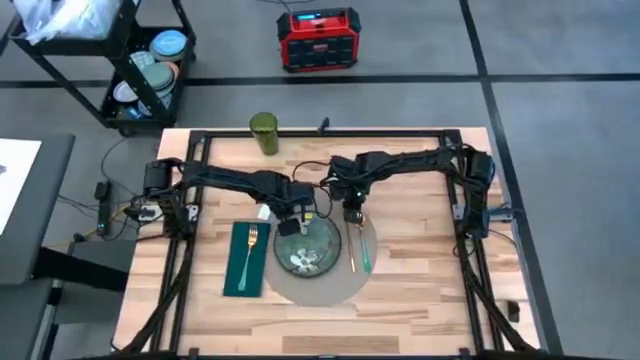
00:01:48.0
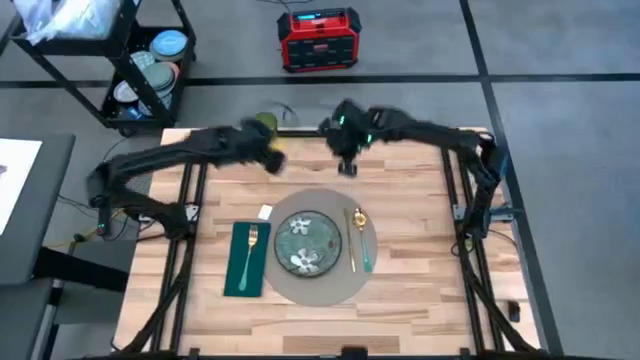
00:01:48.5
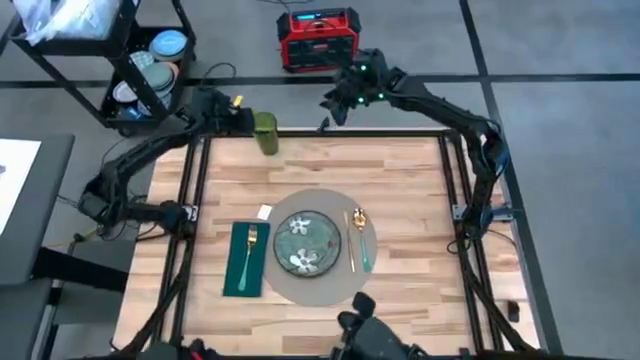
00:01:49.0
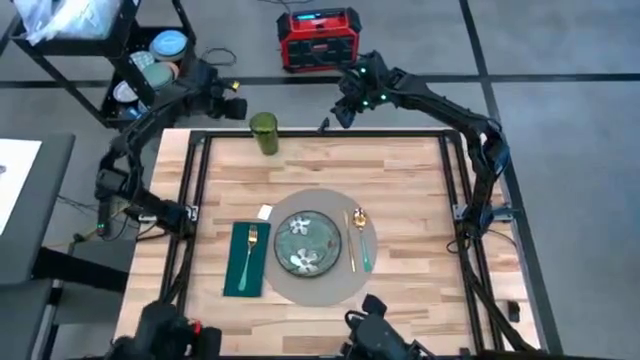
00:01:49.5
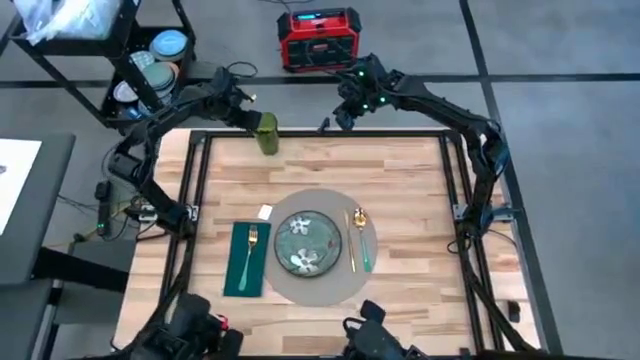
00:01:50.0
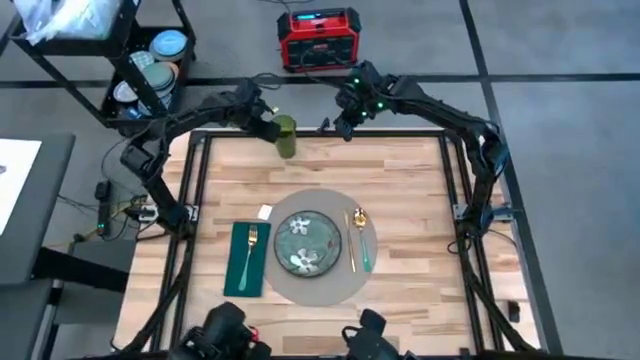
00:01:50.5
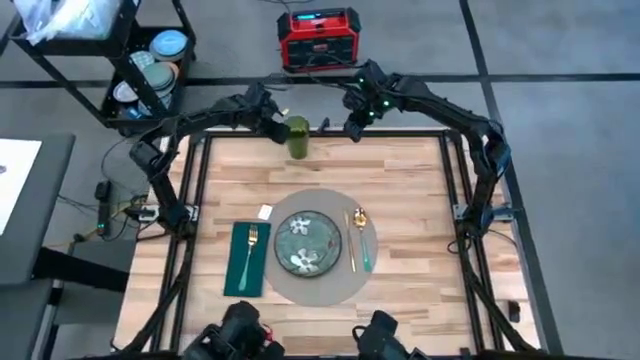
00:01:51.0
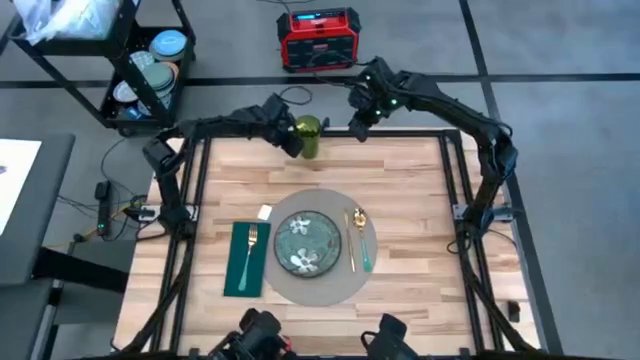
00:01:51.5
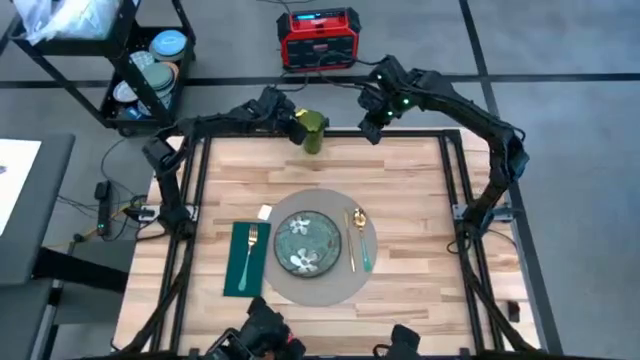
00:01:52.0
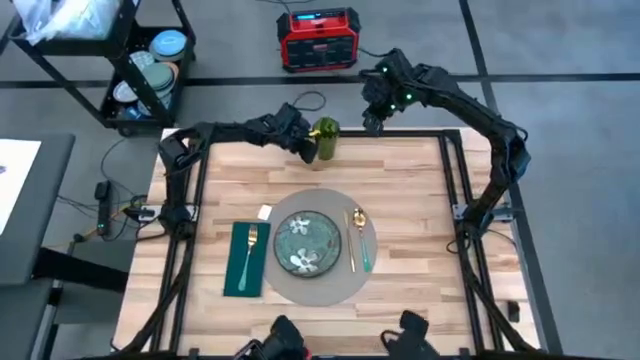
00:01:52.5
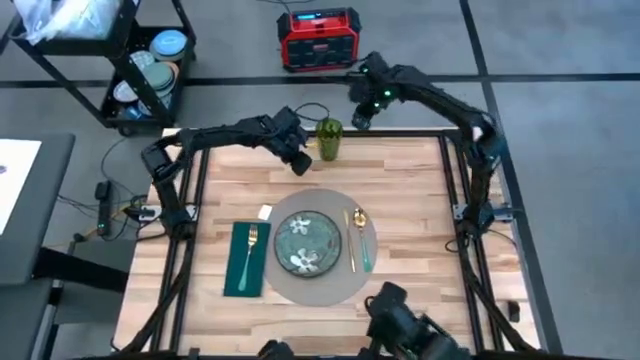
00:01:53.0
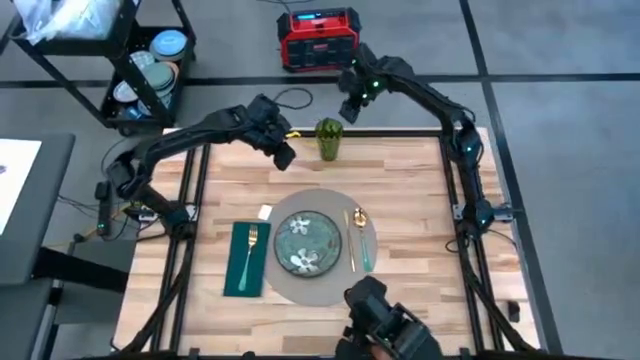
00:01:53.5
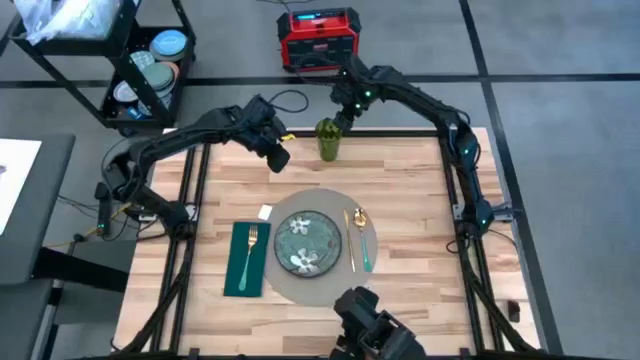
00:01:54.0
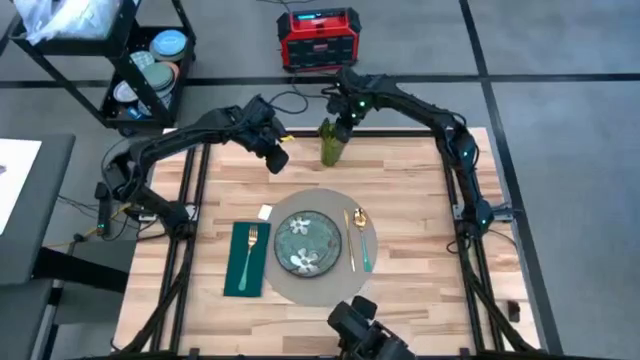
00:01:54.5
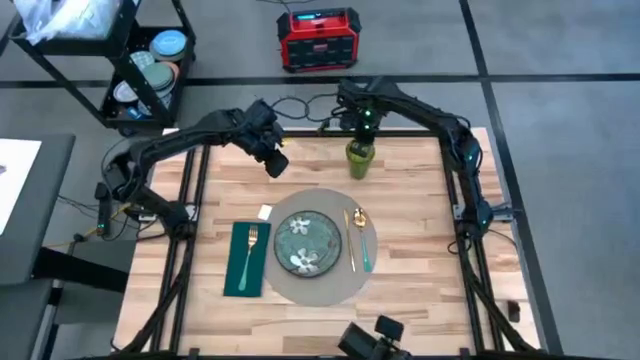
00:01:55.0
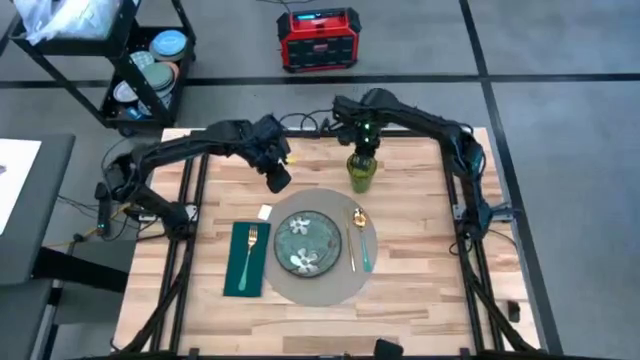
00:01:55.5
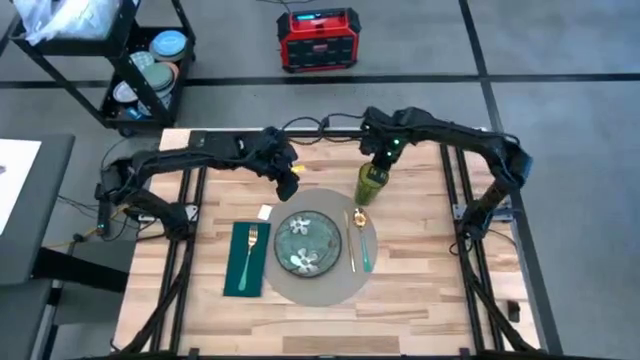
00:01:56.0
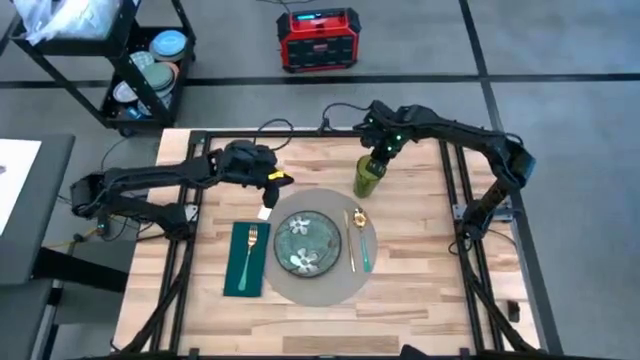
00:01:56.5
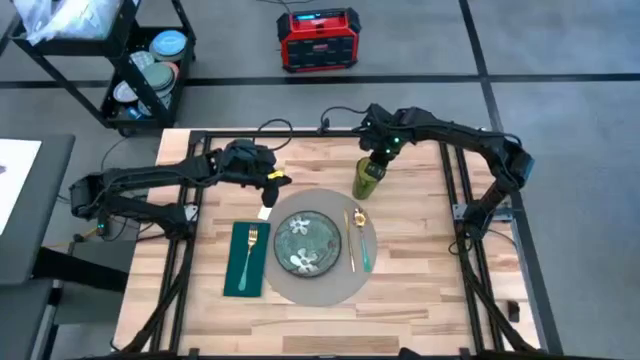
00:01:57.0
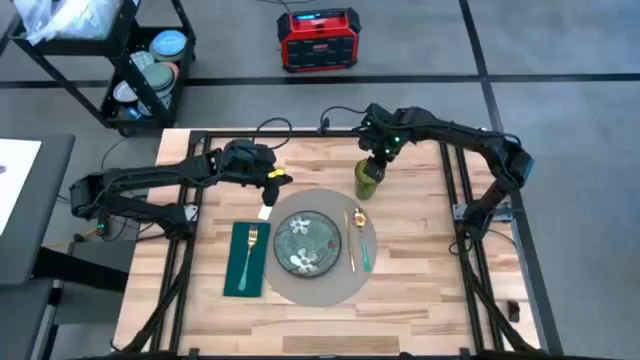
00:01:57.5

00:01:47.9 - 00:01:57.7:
Task: Set table place
Put the green cup beside the gray table mat

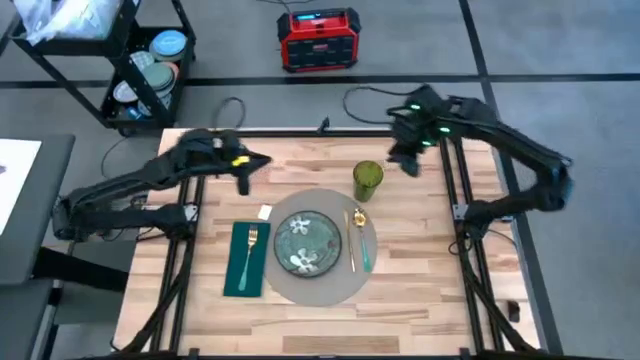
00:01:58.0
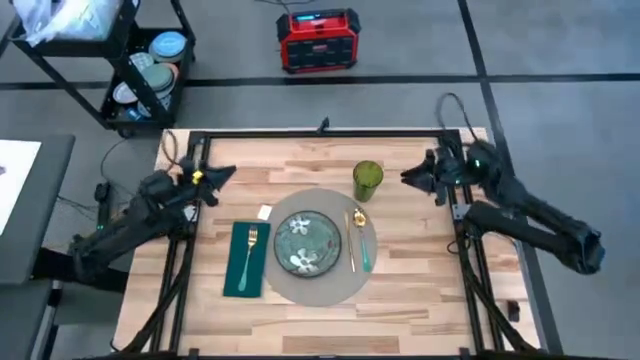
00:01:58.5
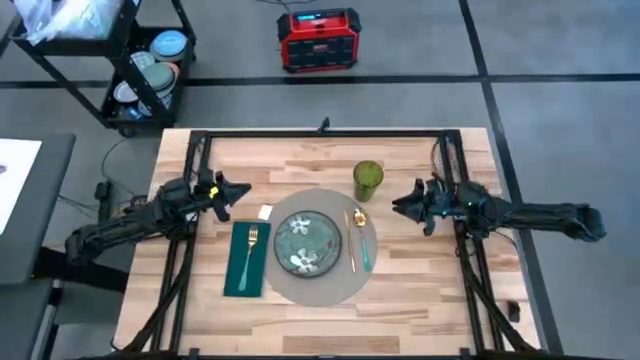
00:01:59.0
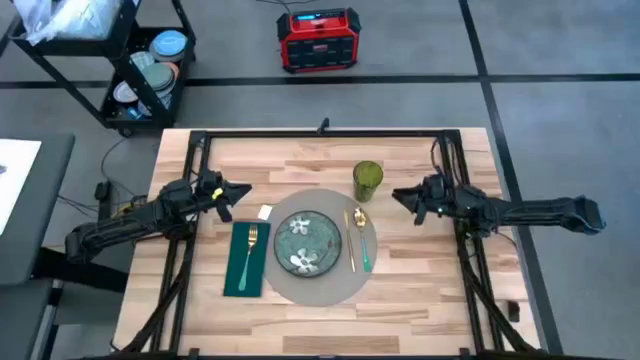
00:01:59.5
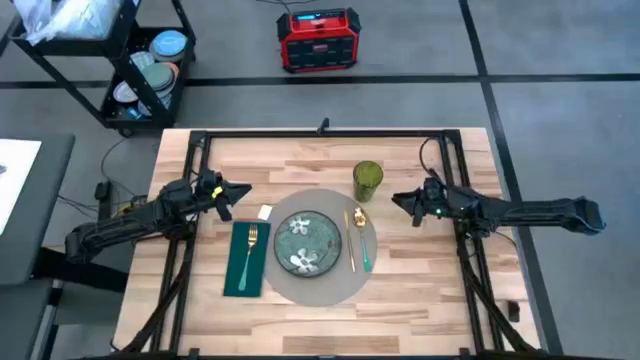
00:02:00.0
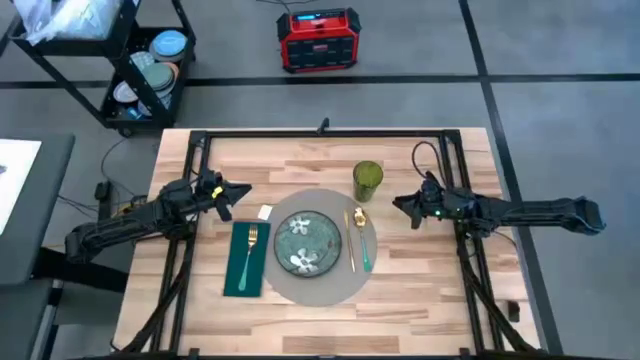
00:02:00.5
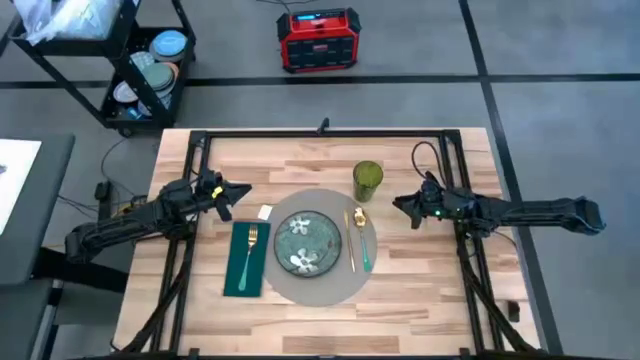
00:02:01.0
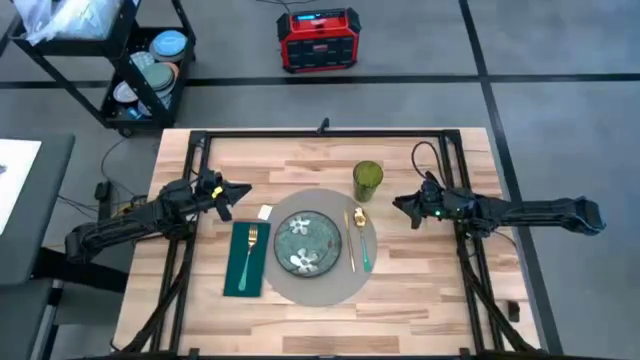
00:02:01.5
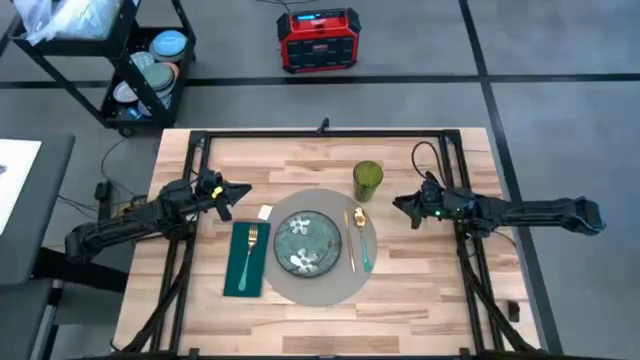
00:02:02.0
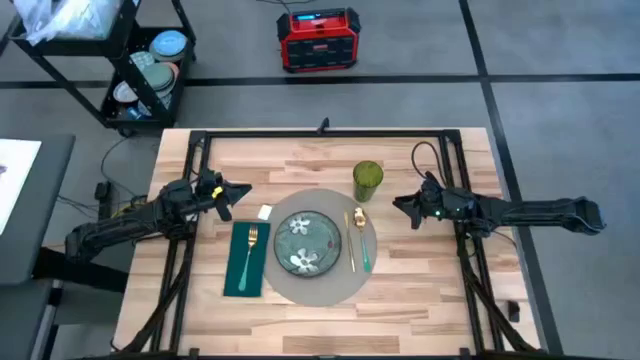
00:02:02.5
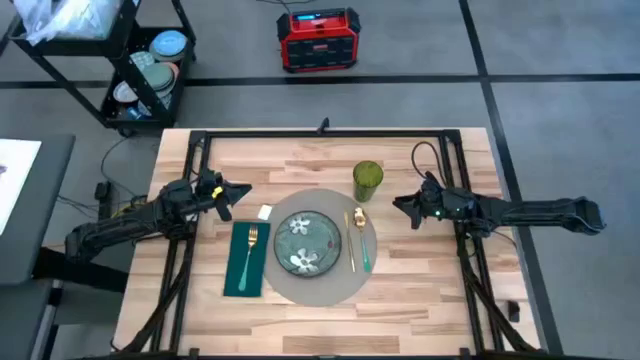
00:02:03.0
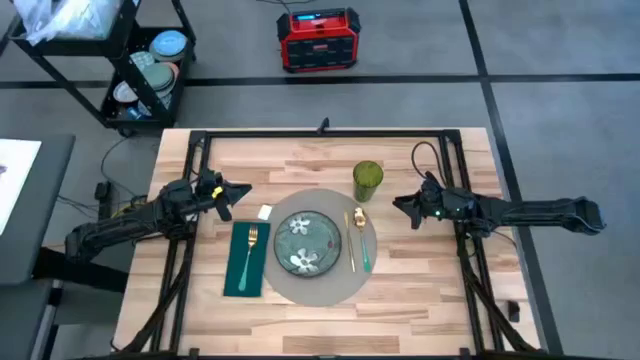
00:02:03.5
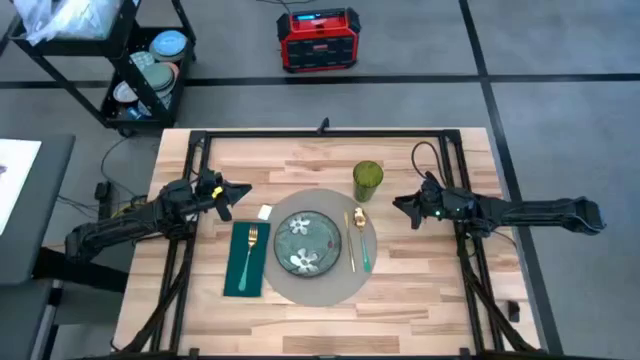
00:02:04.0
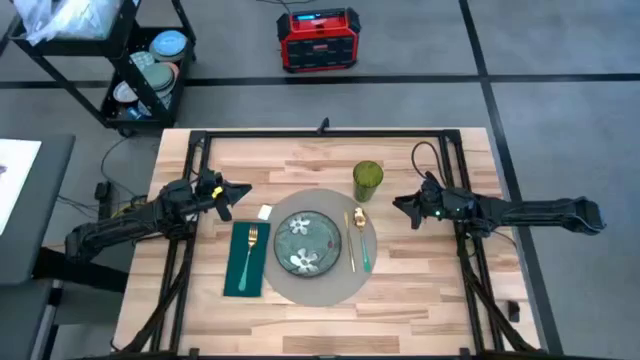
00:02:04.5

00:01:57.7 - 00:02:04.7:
Return to Home Position

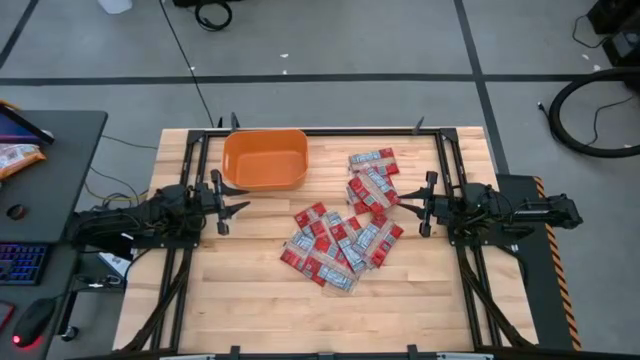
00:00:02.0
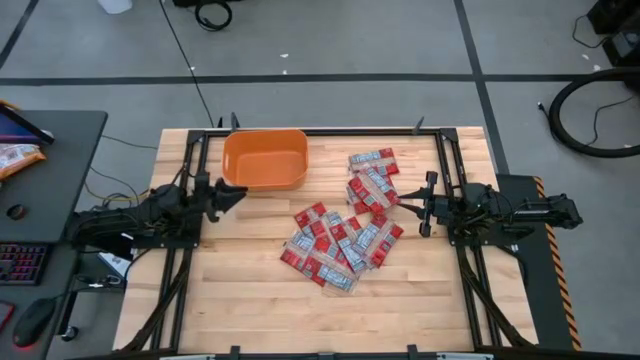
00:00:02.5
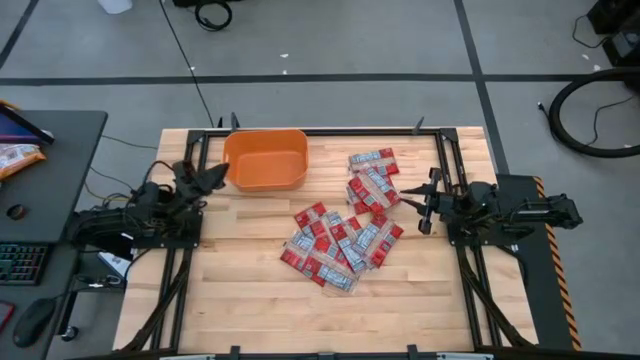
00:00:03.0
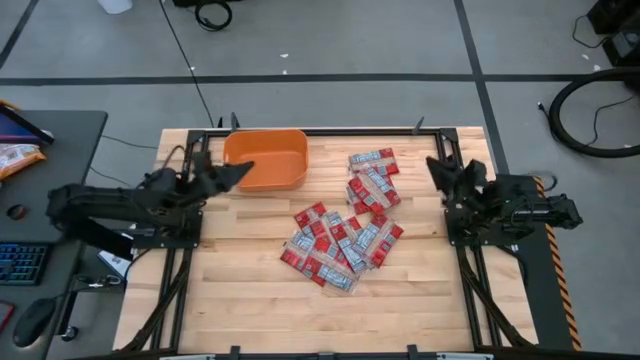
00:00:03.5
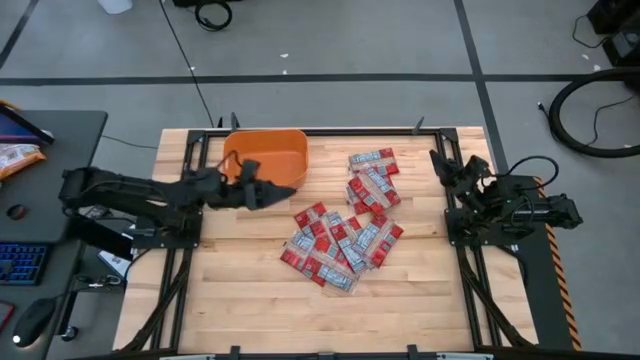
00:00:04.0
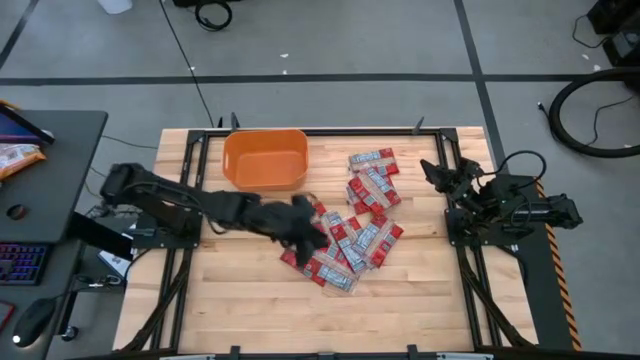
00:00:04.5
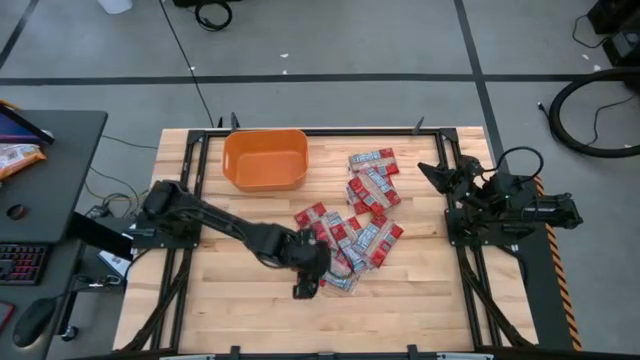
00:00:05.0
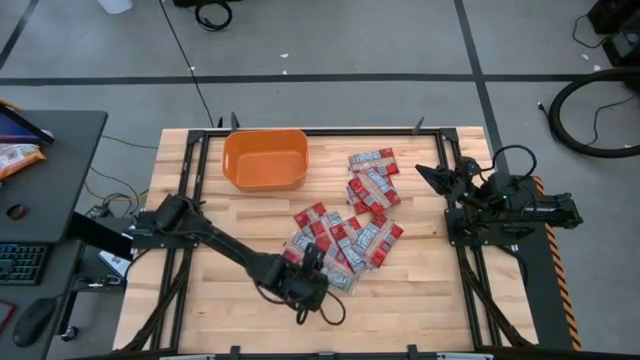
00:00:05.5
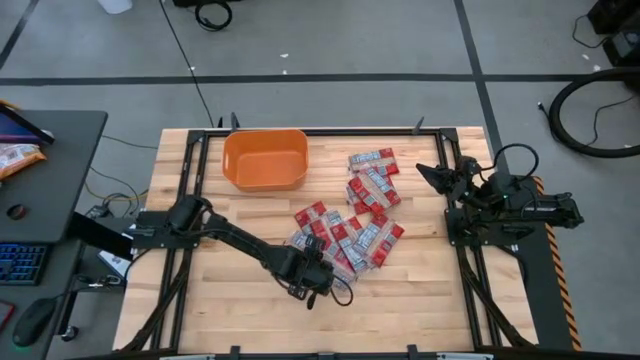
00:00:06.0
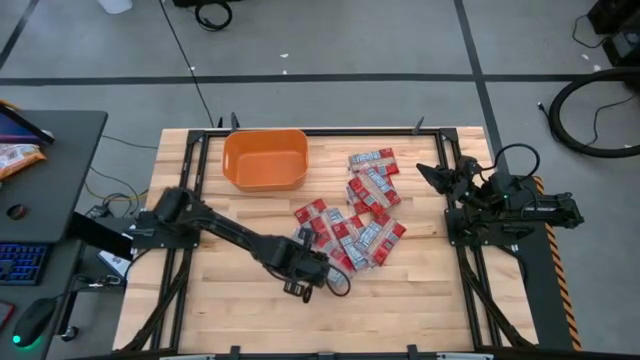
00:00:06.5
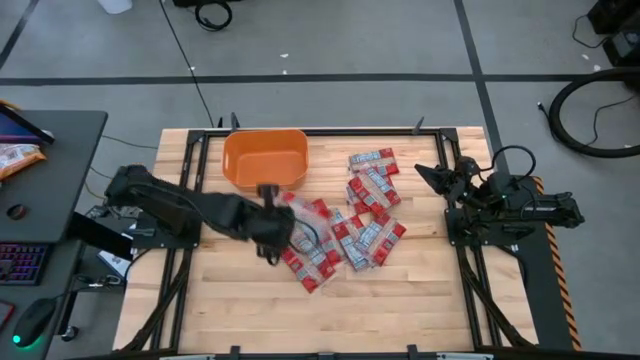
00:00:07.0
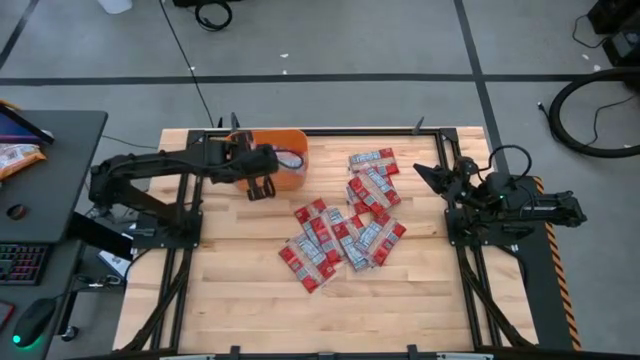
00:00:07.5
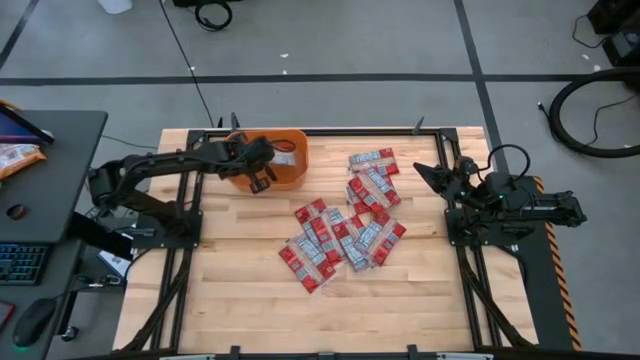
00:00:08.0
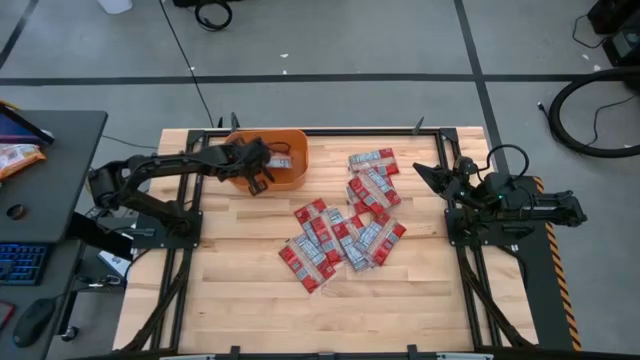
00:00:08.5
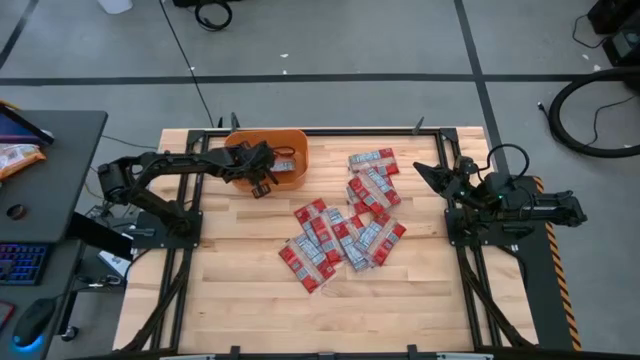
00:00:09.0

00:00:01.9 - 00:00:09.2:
Task: Sort popcorn bags into baskets
Put the red popcorn bag into the orange container
